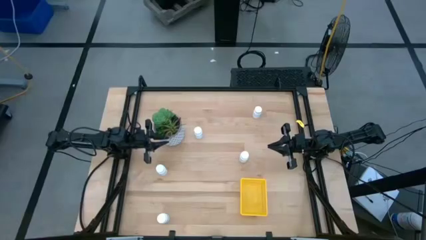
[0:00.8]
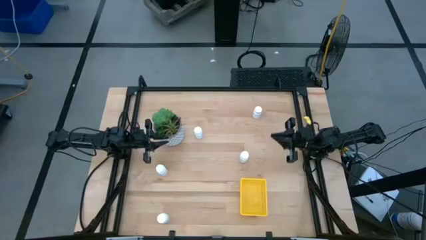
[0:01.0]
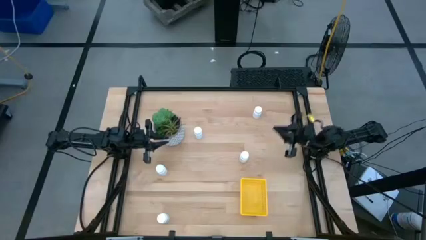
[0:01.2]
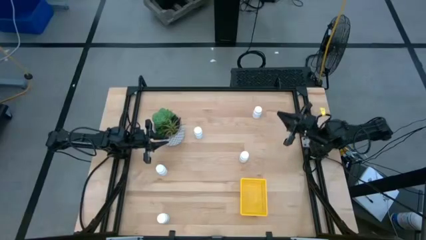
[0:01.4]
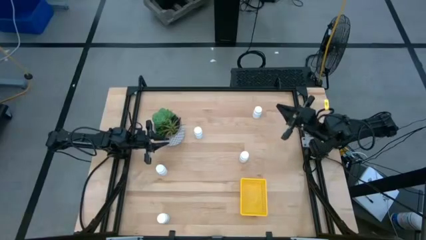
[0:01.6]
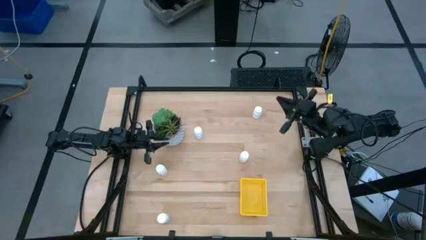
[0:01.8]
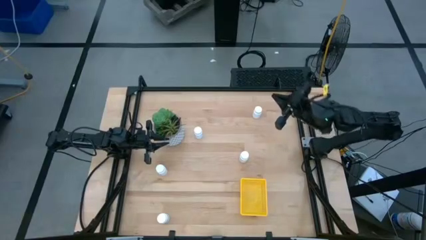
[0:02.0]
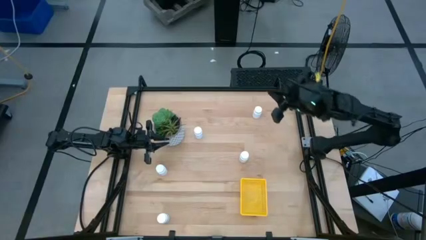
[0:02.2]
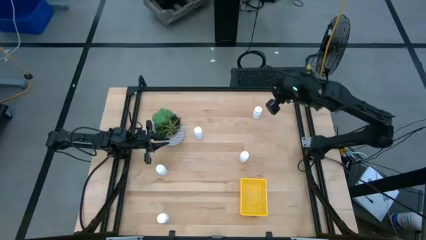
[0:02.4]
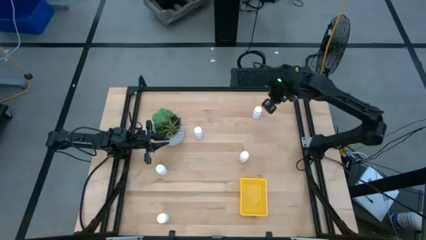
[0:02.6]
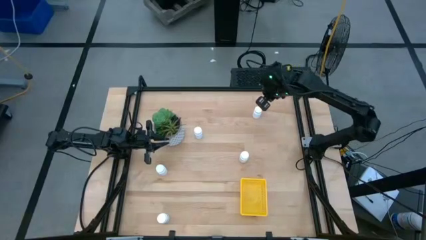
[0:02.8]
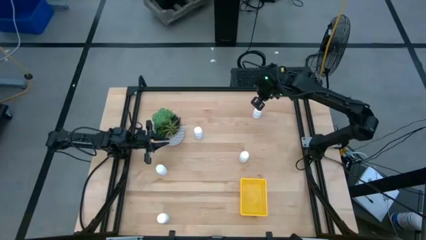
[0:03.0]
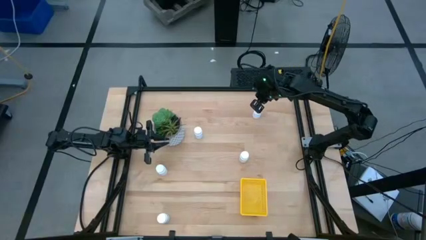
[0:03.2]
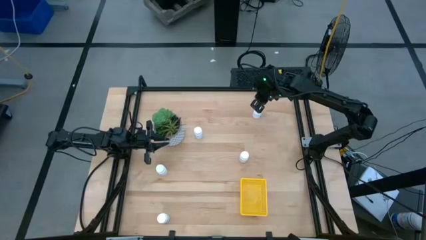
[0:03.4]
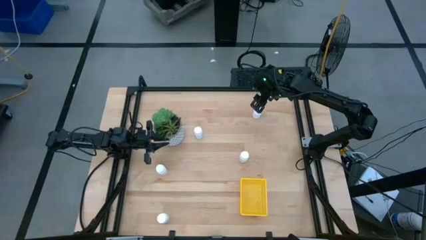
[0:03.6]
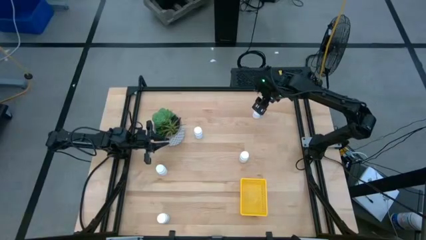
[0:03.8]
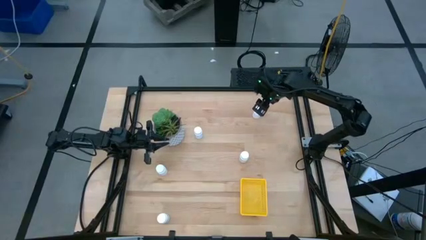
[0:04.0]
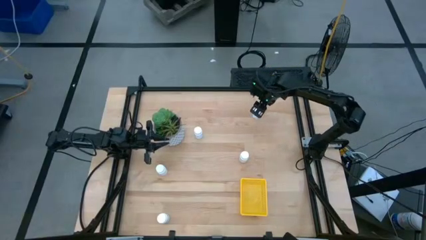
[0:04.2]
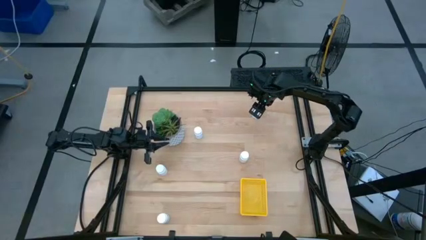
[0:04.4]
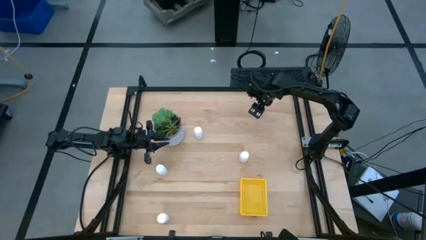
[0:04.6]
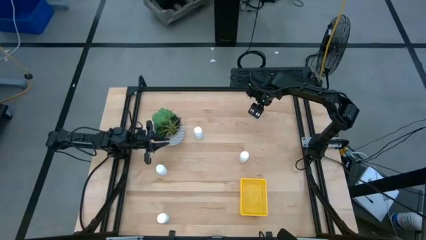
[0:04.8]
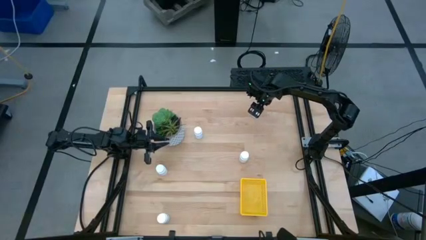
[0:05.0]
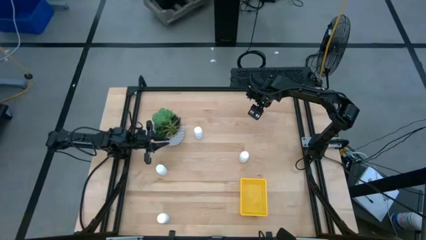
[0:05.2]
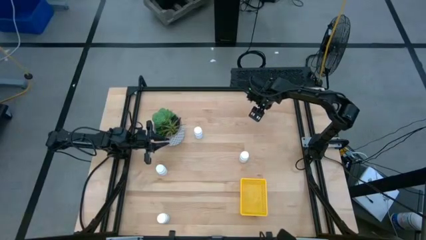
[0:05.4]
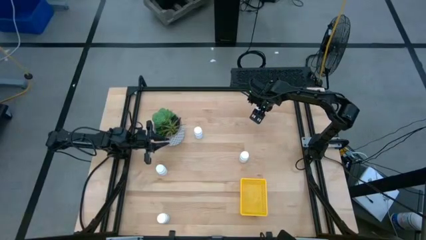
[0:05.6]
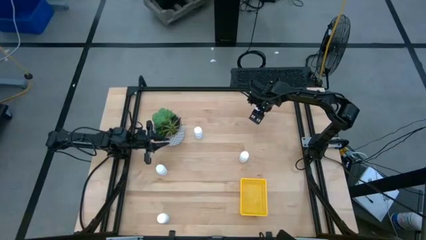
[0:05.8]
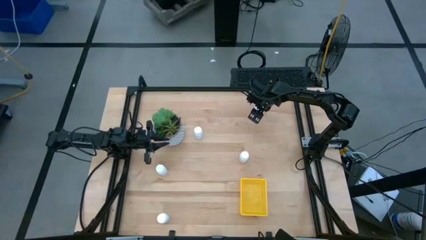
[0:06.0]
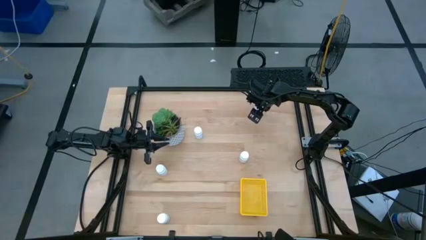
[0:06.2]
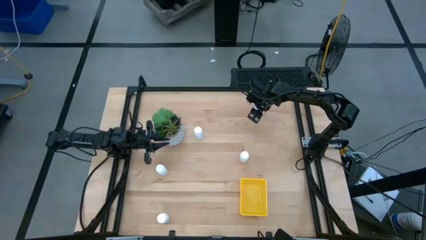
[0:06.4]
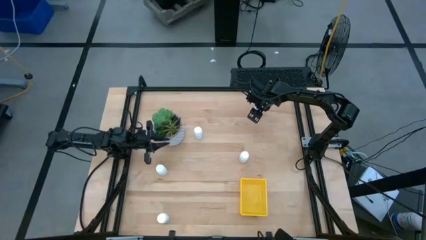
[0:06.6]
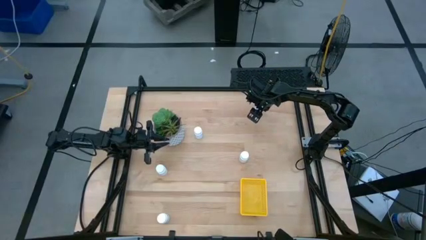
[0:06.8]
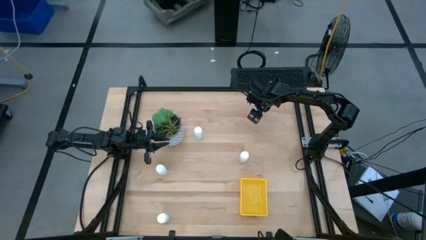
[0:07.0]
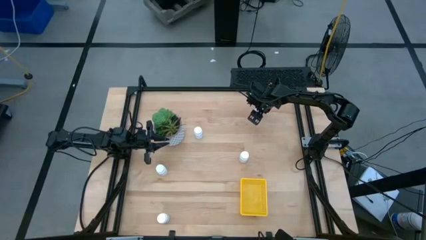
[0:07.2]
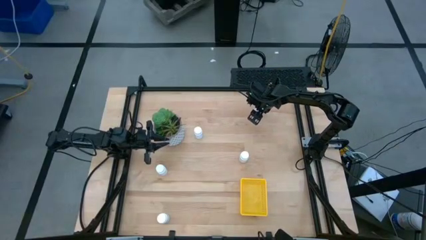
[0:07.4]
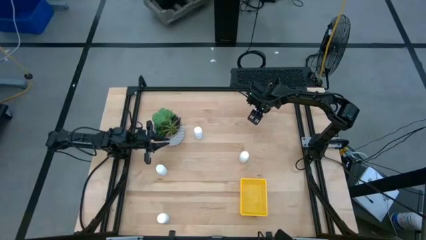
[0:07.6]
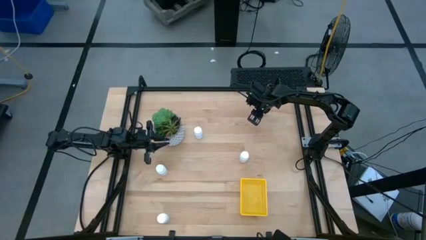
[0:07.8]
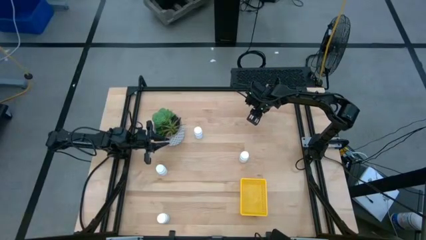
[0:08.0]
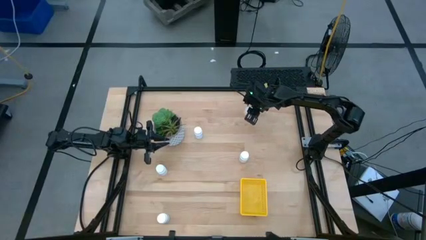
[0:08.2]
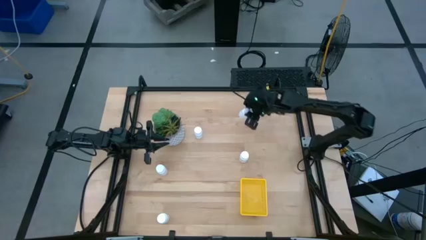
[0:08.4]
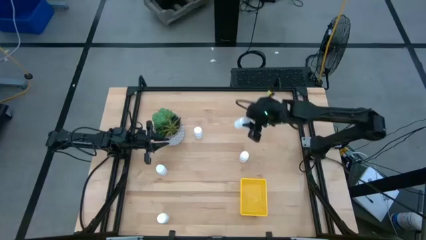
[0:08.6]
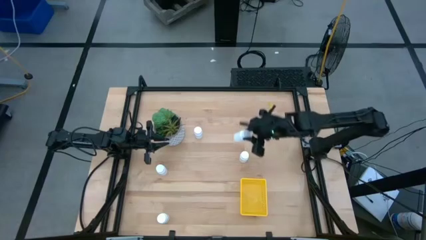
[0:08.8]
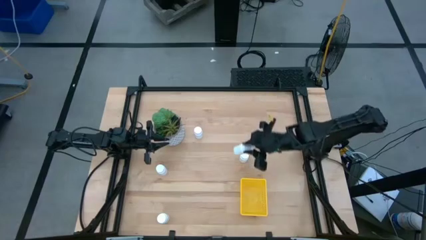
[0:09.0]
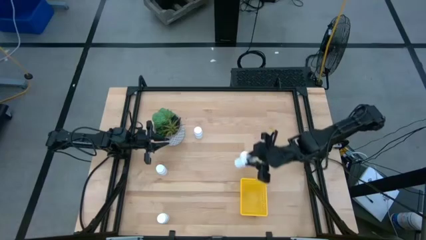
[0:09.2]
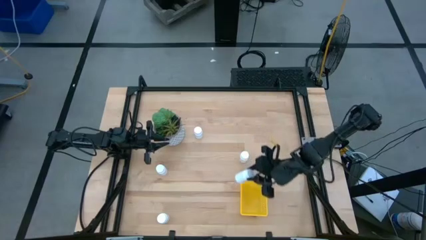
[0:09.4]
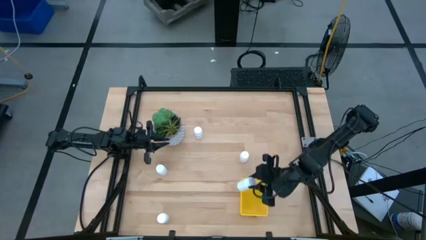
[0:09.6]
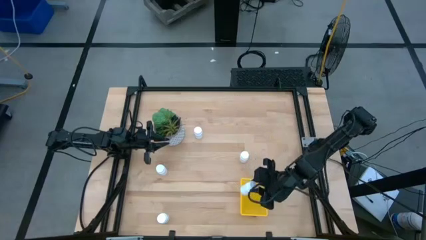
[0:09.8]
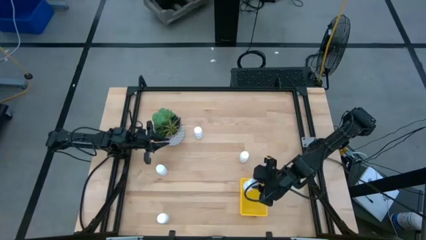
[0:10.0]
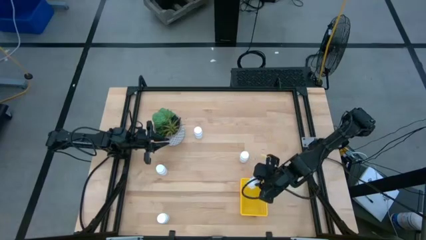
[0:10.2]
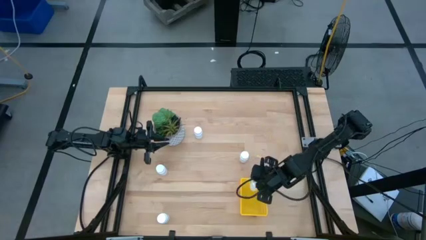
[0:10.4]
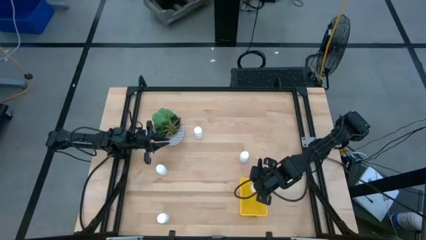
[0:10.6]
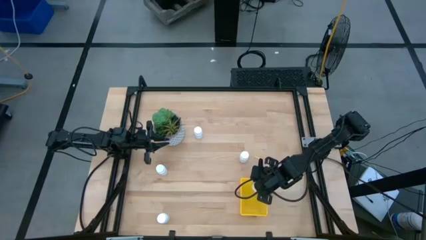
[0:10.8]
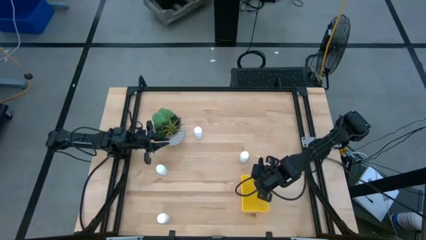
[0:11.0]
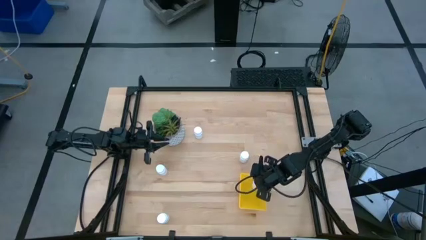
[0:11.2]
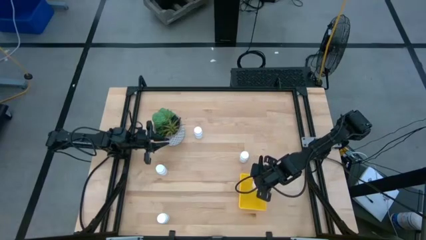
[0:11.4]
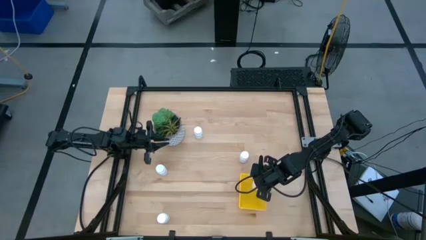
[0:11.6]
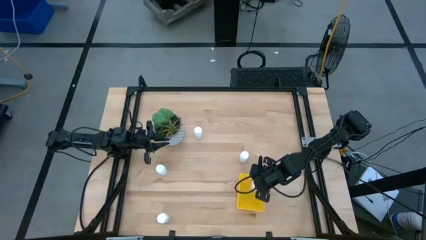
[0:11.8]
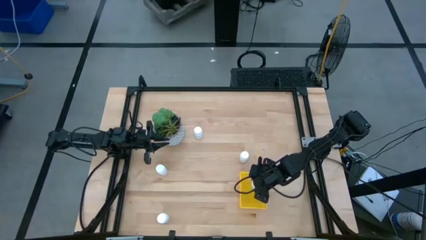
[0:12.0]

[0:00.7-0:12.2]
Task: Pick and place pill bottles into a basket
Put the pill bottle into the basket
